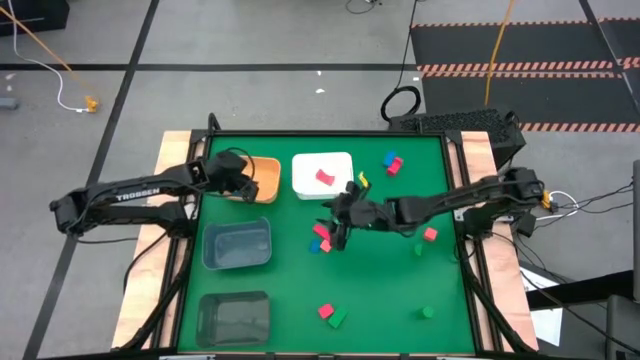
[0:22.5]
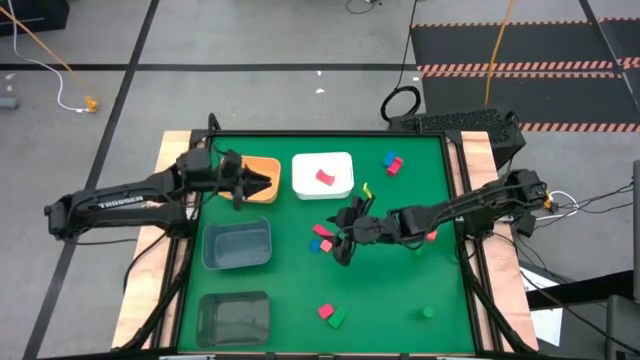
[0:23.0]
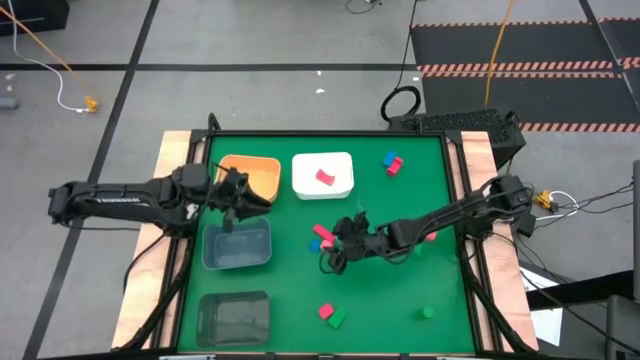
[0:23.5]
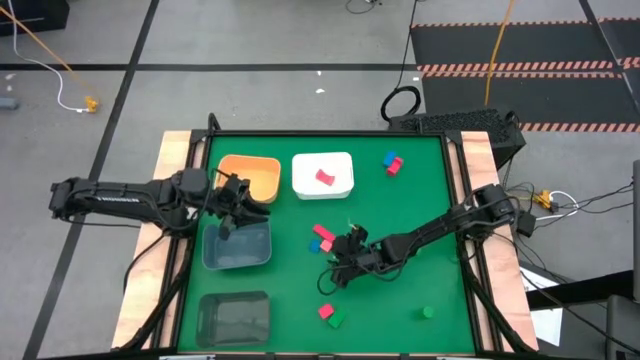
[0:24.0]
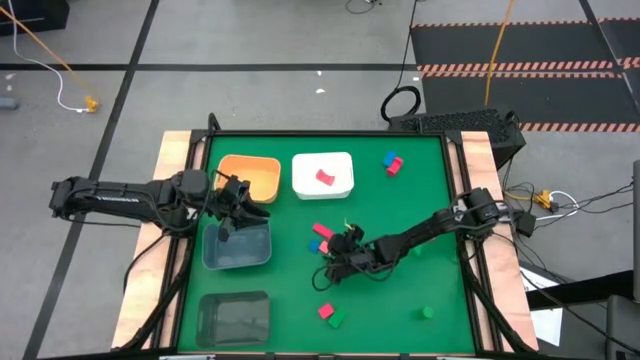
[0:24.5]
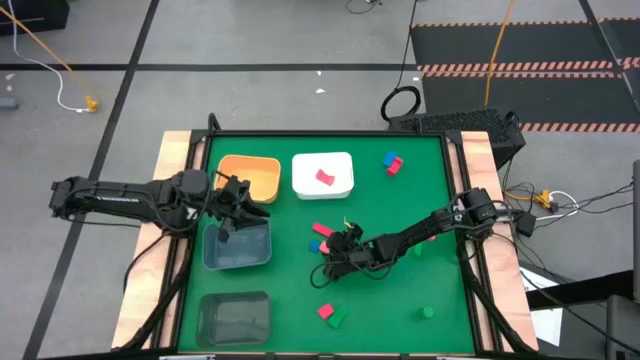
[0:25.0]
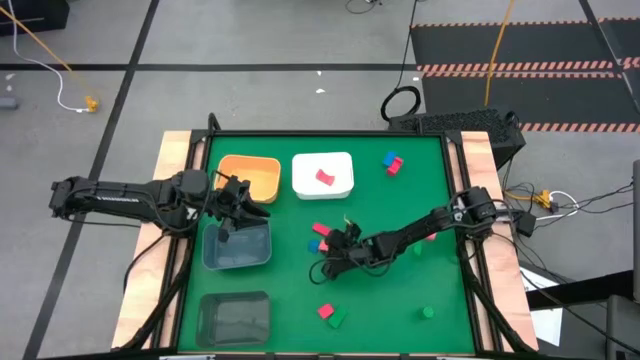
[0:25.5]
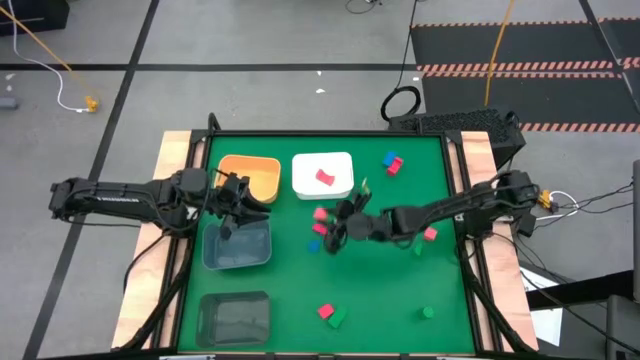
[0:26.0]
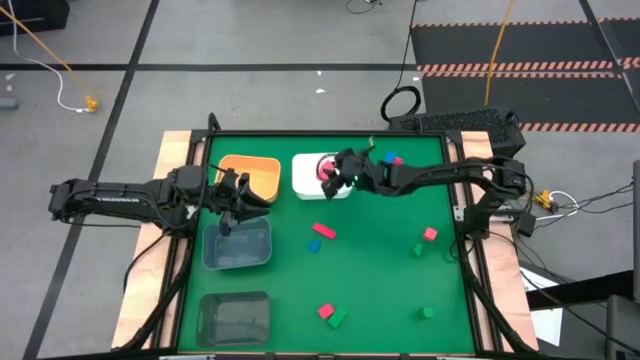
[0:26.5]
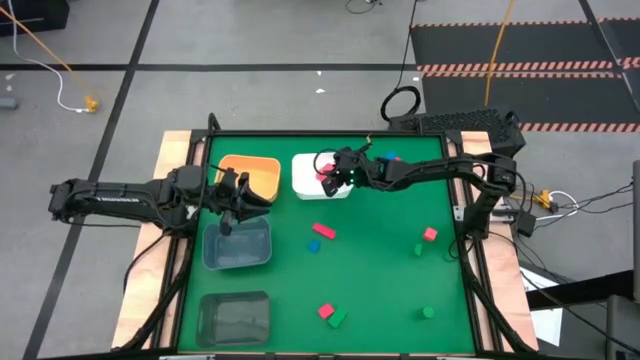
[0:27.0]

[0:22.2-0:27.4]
Task: Sort & place blocks by color
Put the left pink block into the white bin

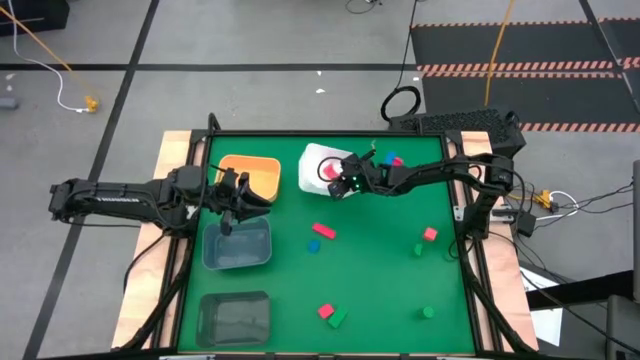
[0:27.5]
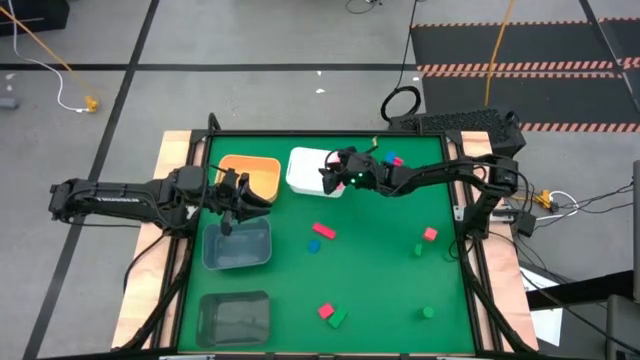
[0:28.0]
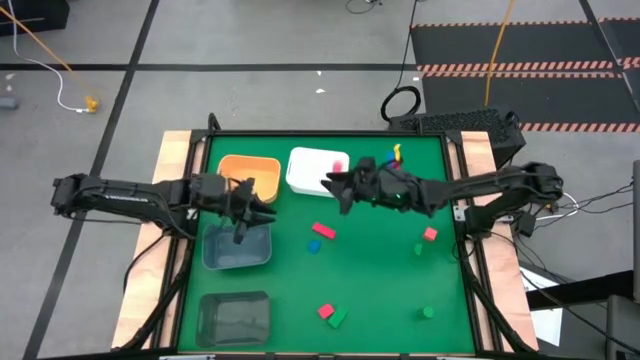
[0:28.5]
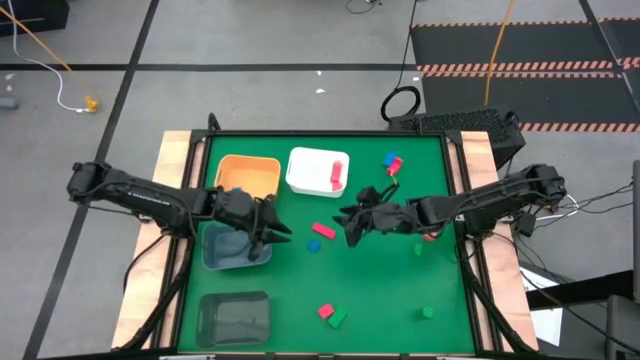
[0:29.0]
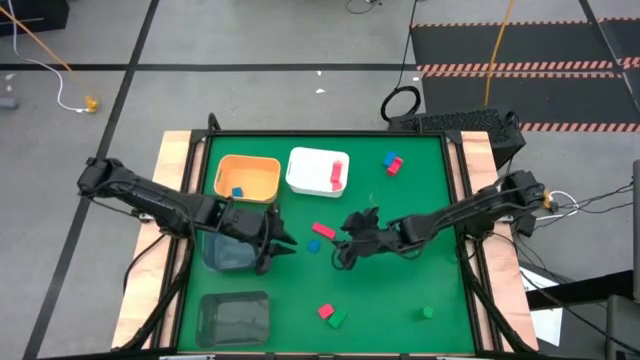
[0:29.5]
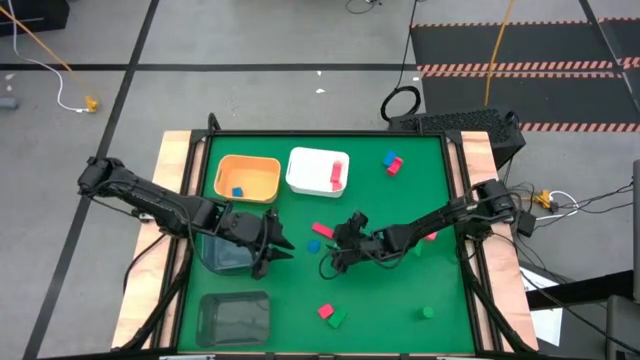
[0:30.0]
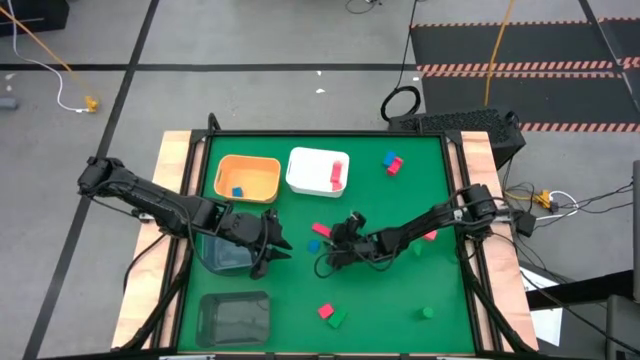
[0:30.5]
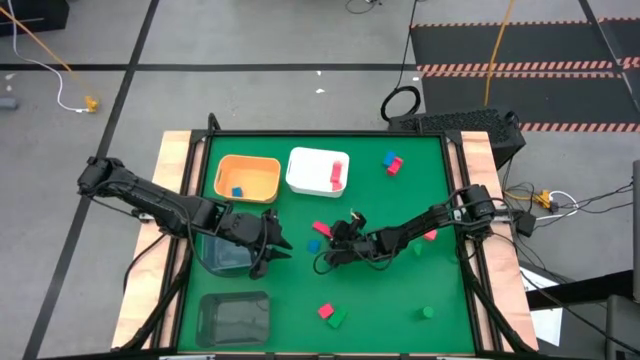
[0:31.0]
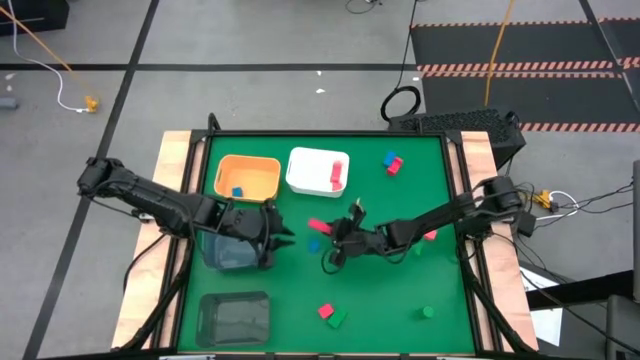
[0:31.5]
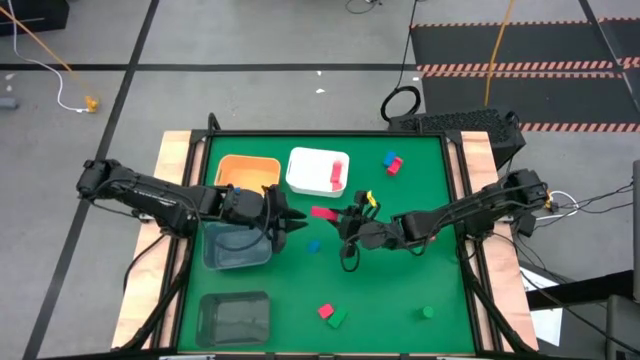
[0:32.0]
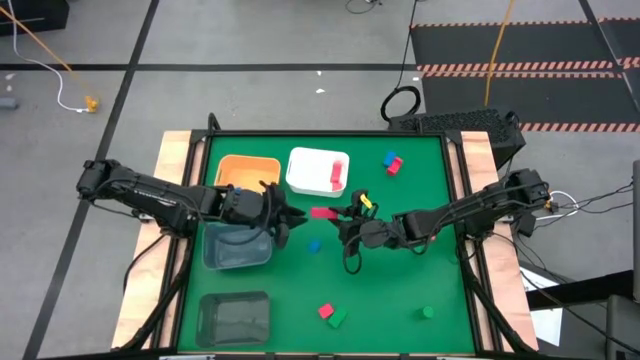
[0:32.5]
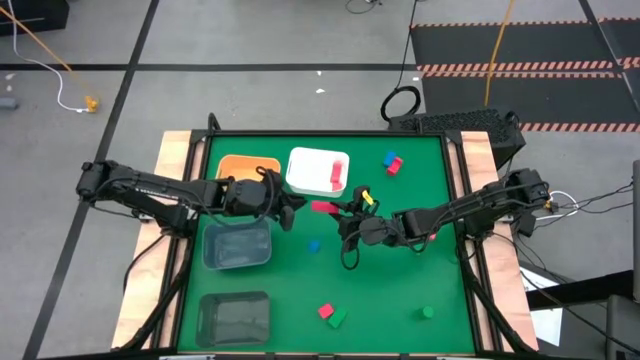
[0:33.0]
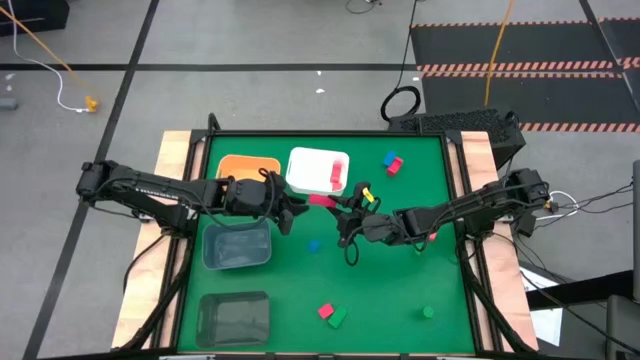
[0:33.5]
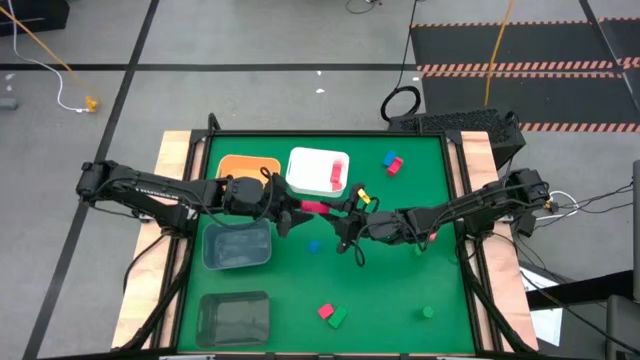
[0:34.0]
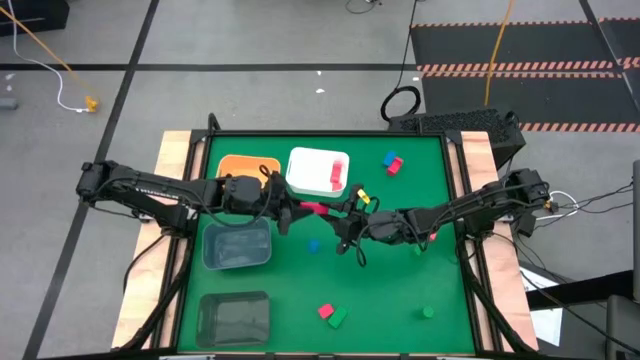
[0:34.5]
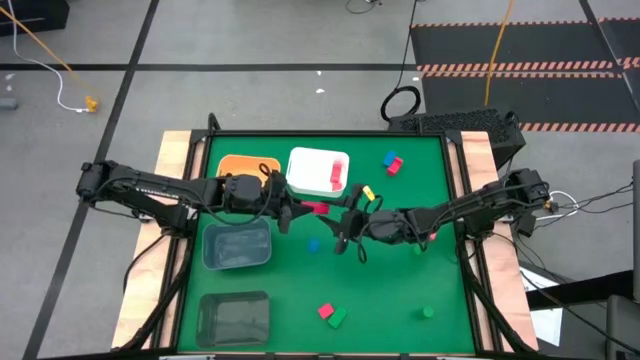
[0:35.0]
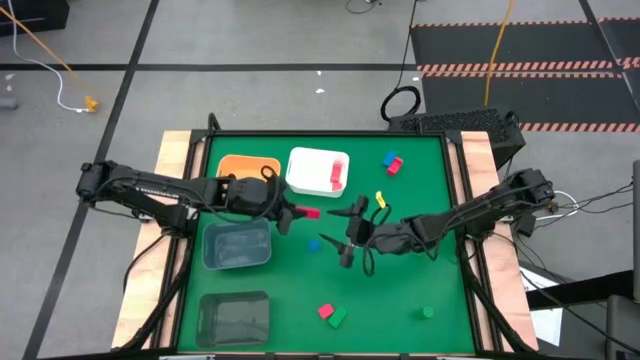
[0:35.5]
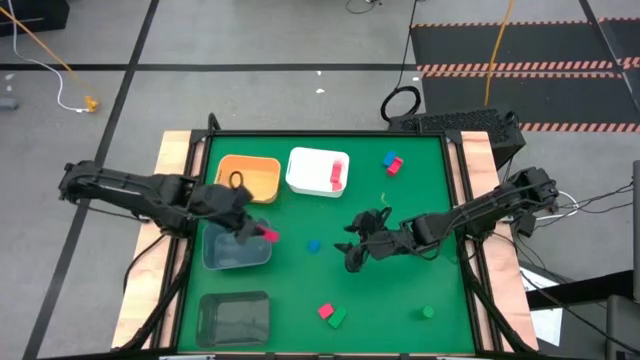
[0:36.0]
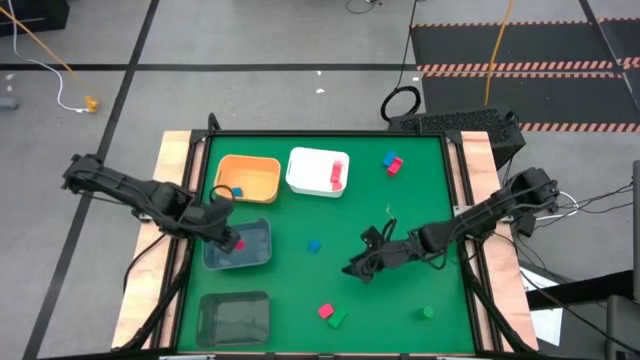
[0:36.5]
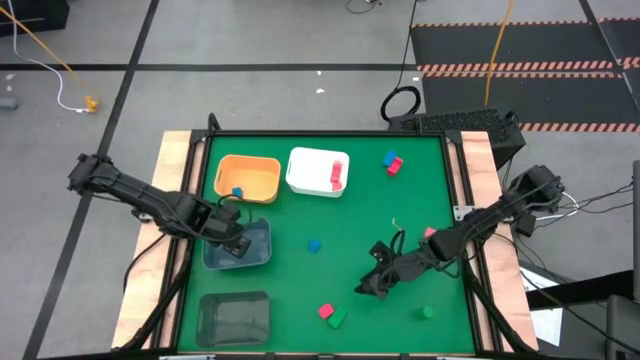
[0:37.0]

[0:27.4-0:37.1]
Put the middle left red block into the grey bin

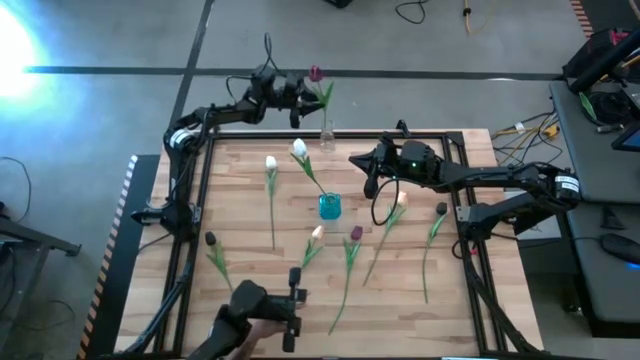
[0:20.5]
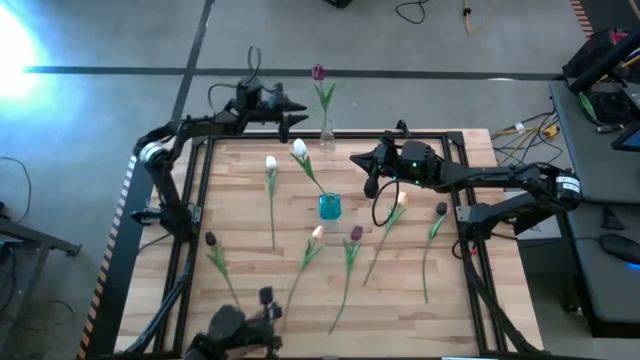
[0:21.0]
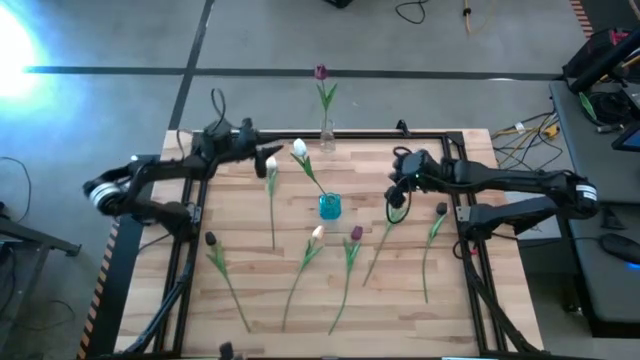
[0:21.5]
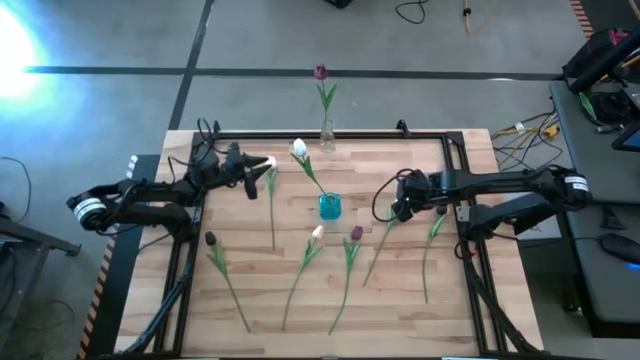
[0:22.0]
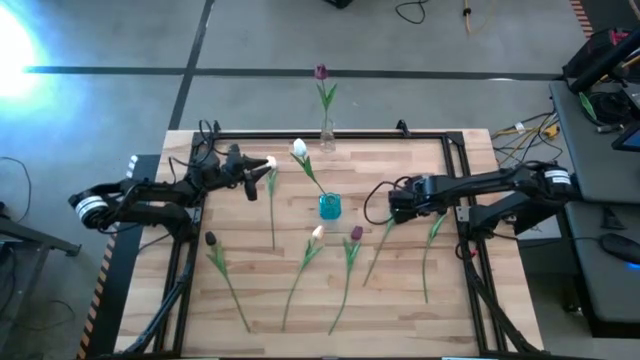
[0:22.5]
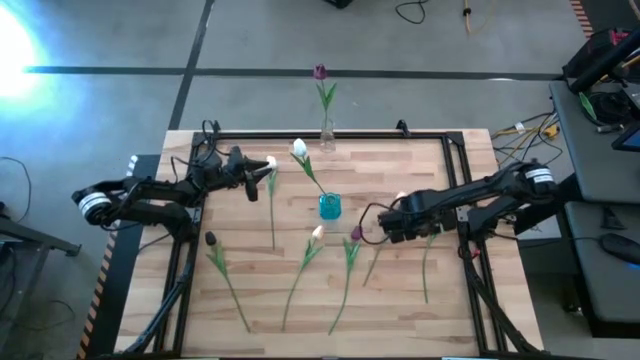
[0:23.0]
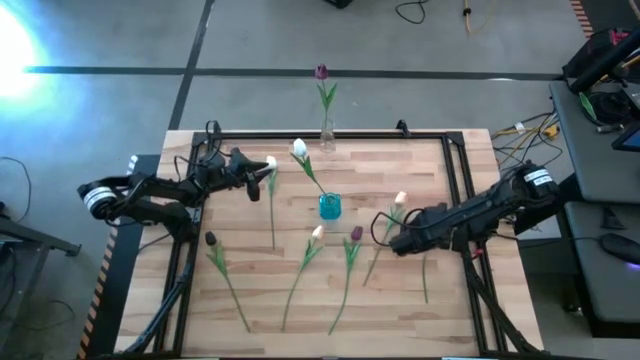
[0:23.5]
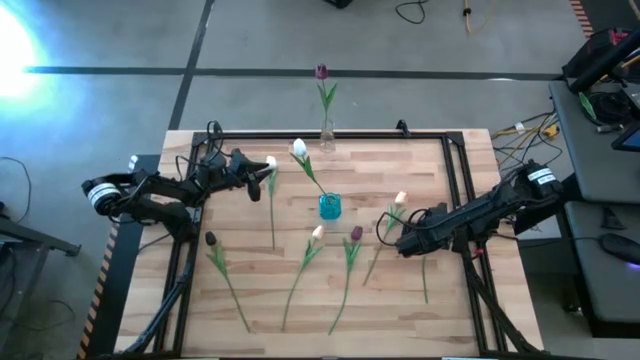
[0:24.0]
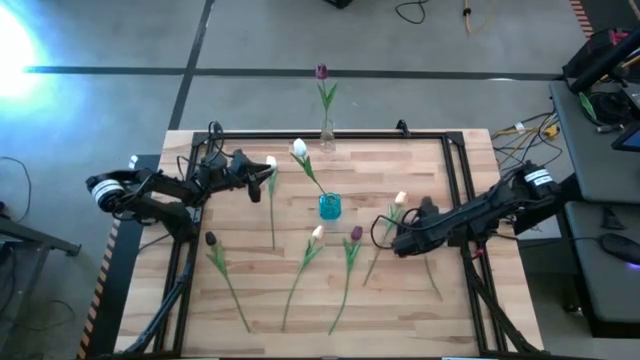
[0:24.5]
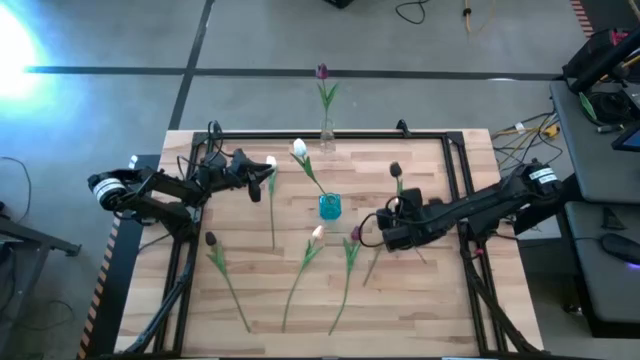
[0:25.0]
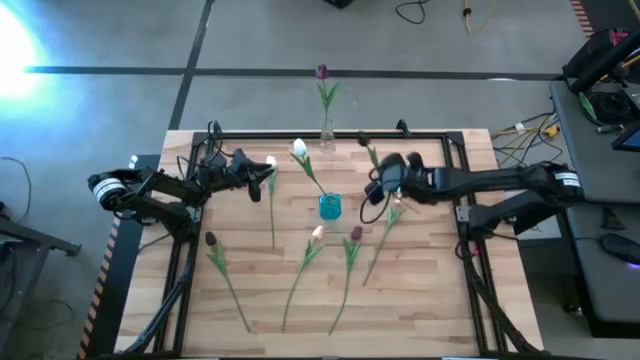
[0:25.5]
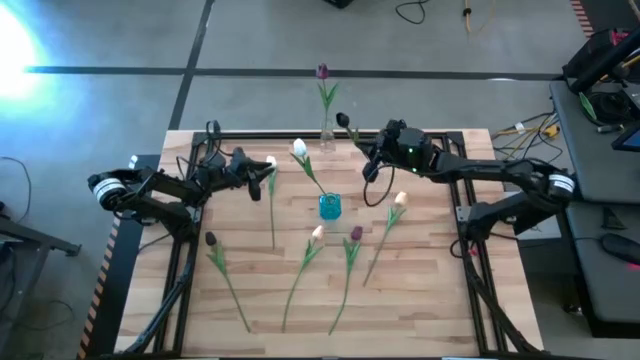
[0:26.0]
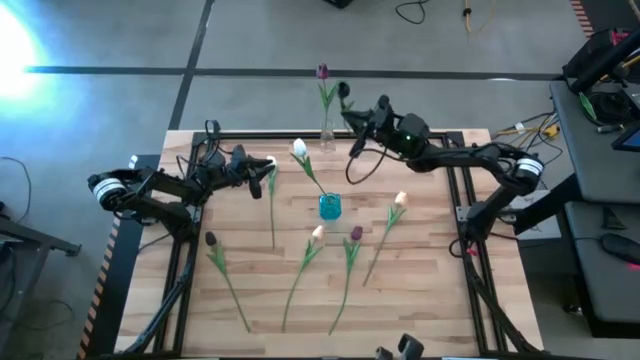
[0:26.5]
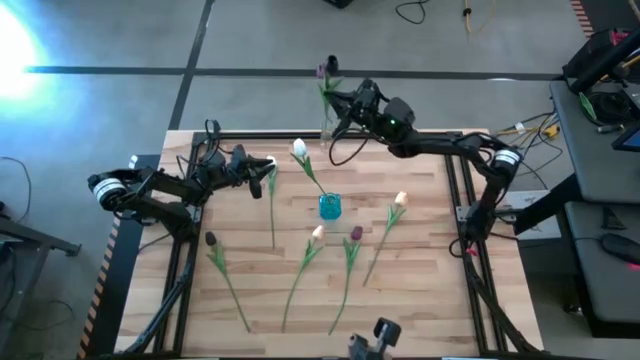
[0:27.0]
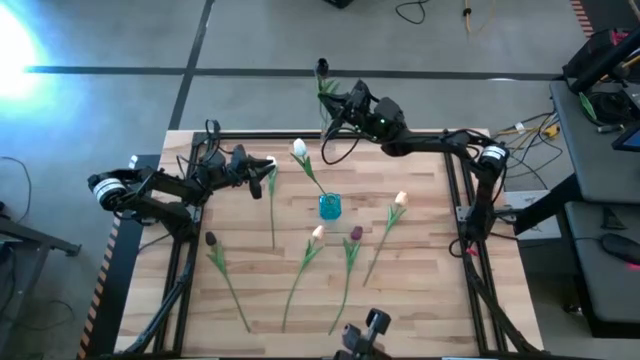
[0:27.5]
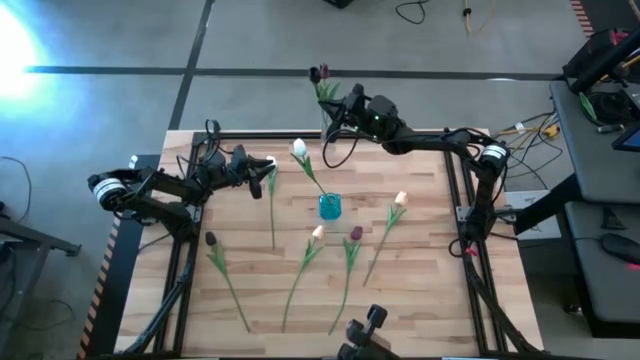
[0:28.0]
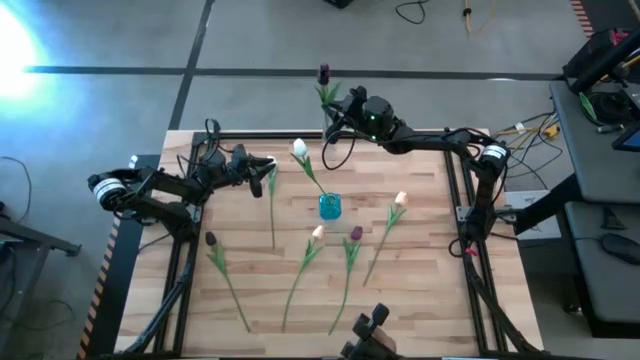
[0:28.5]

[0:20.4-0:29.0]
Task: Sort flowers into vase by color
Put the right black tulip into the transparent vase
